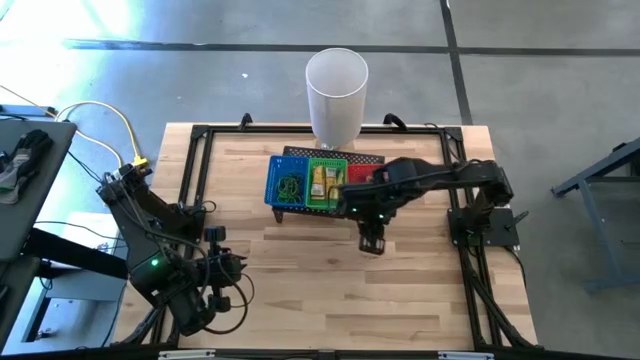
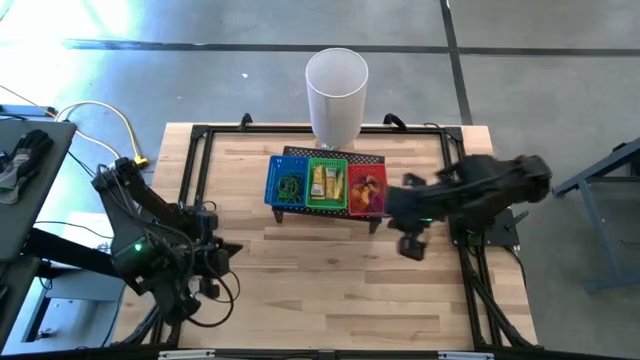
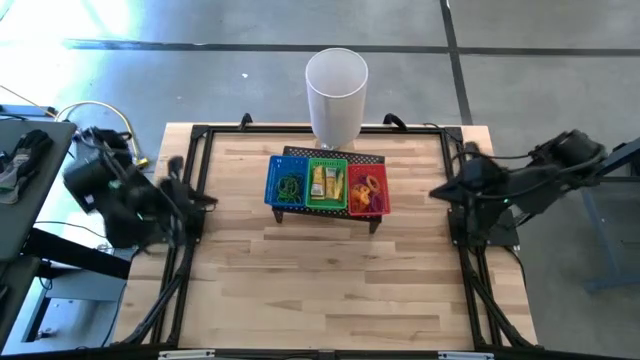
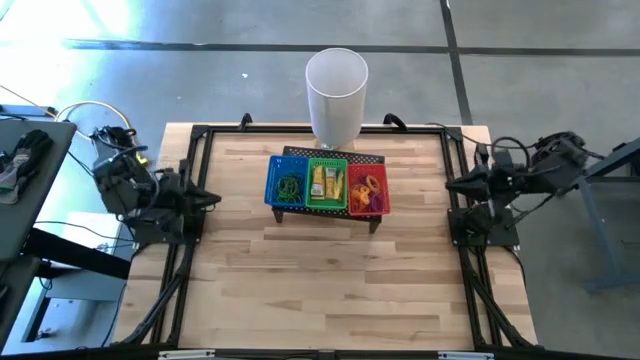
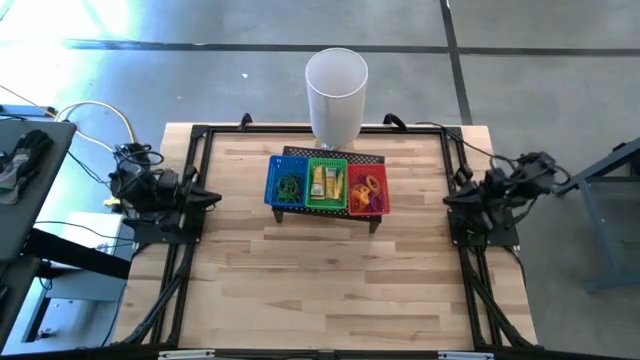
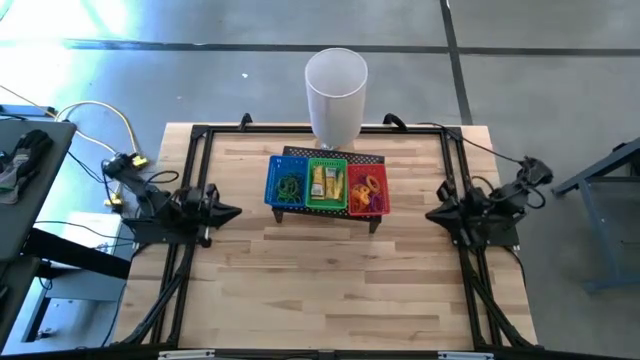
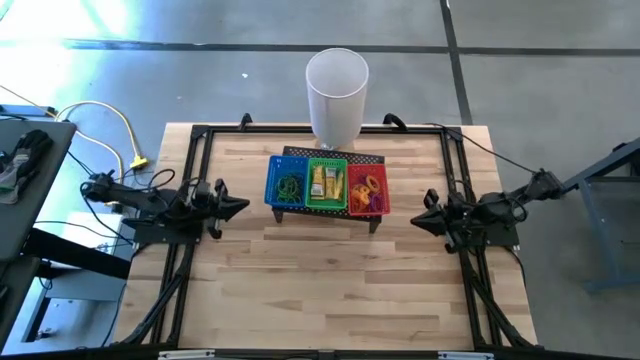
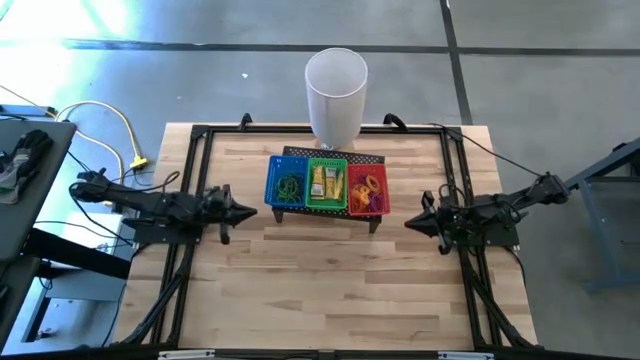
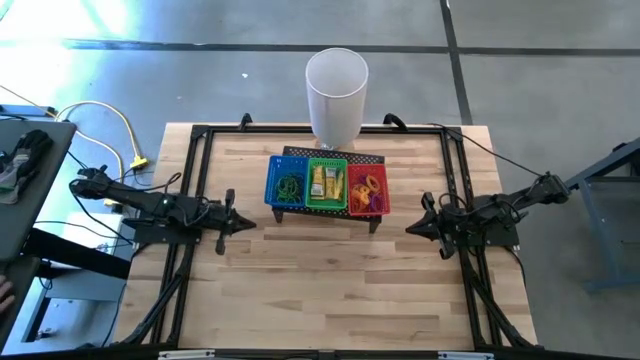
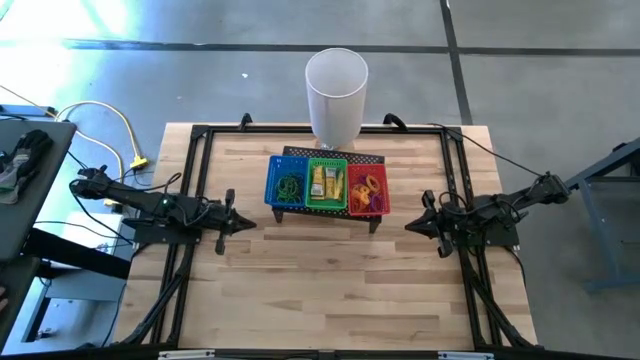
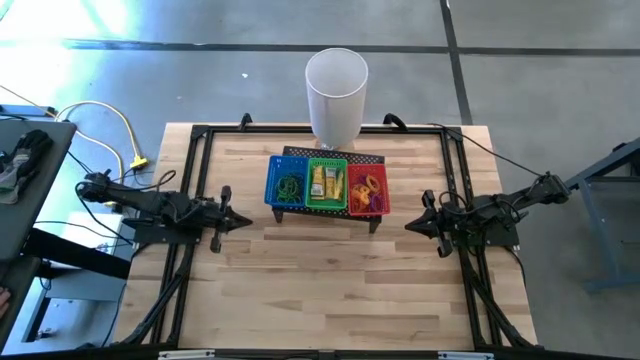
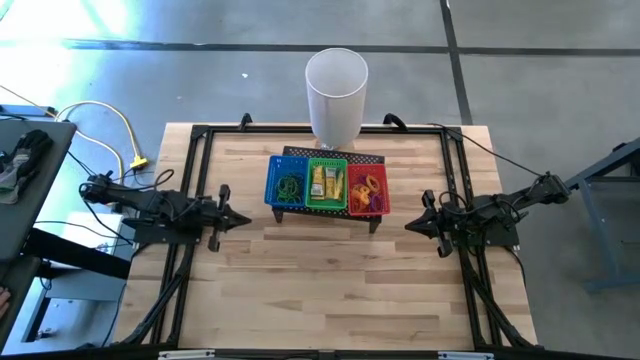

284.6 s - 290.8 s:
Task: Pick & Place Office Desk Supplies
Return to Home Position

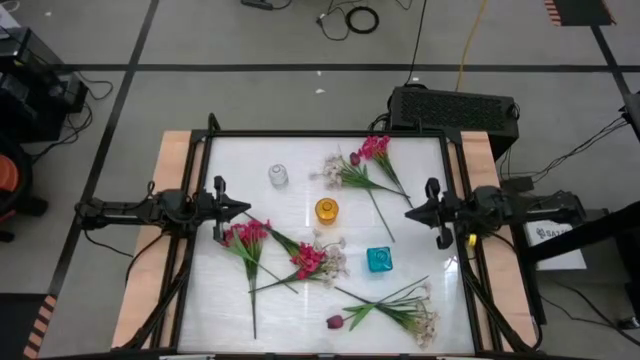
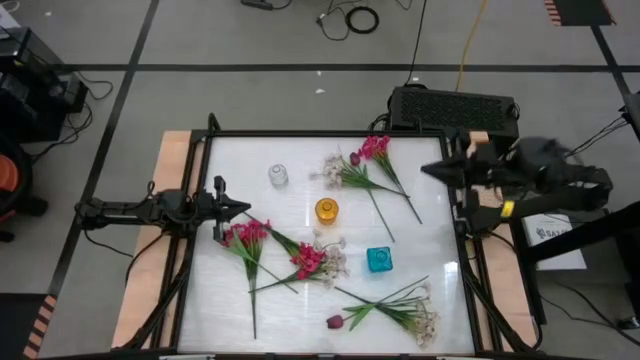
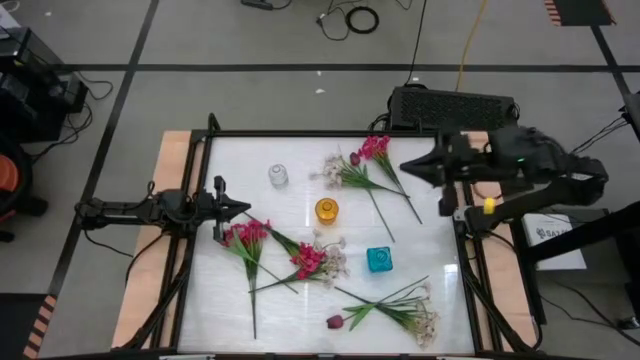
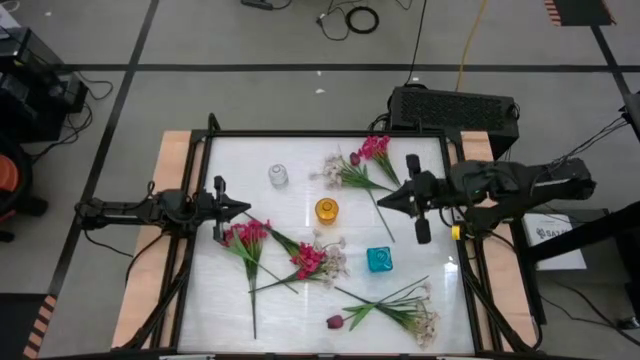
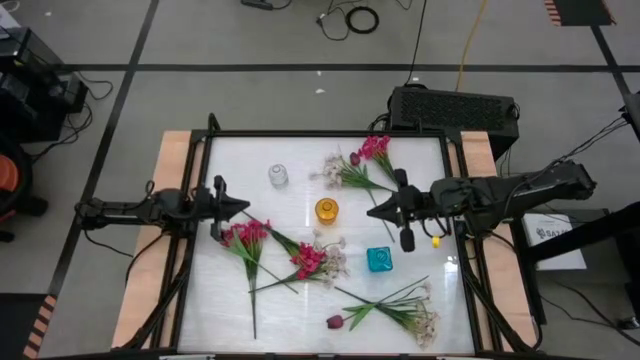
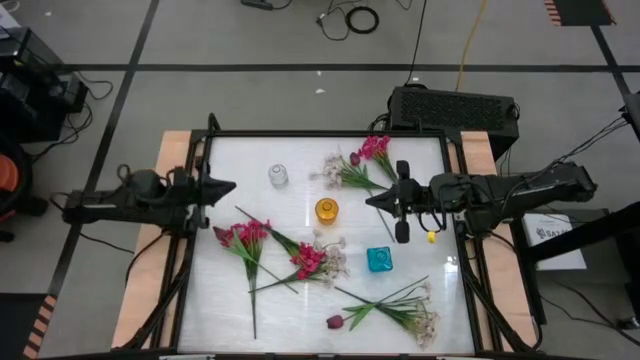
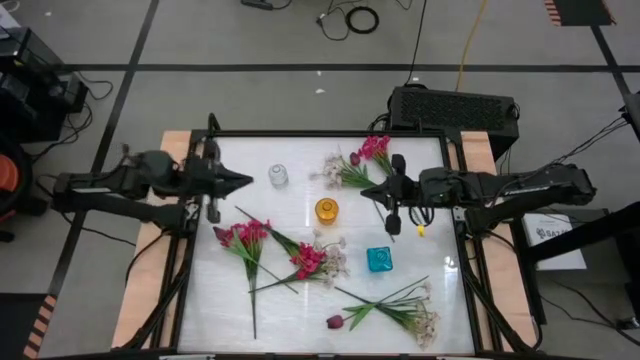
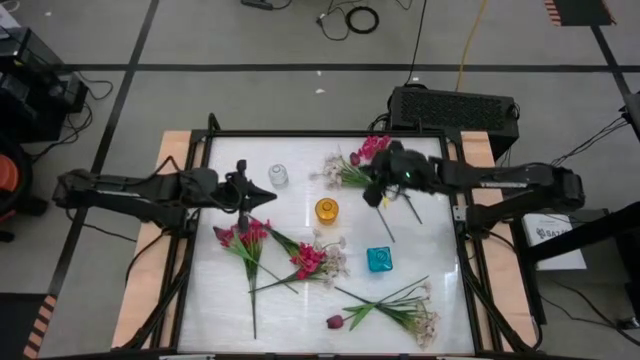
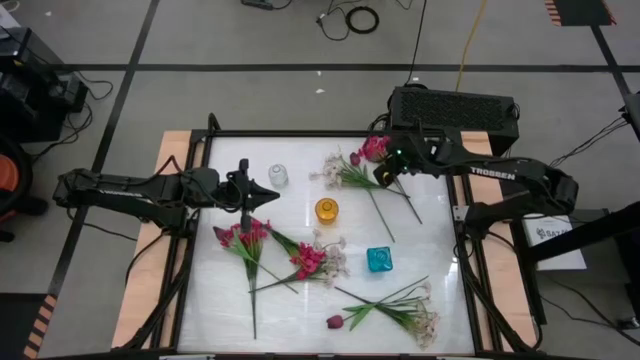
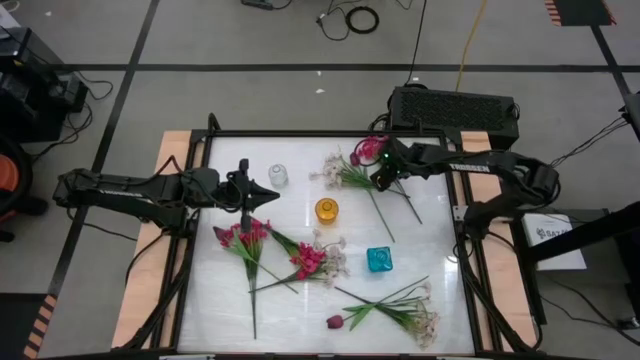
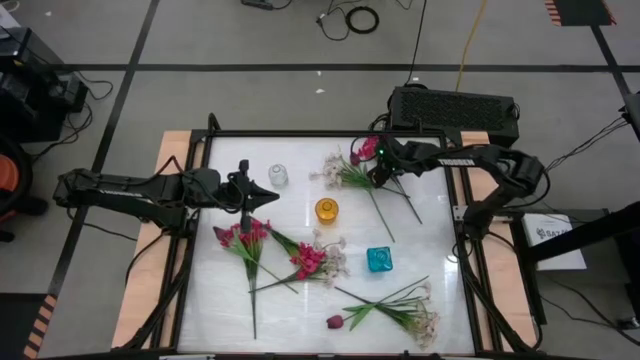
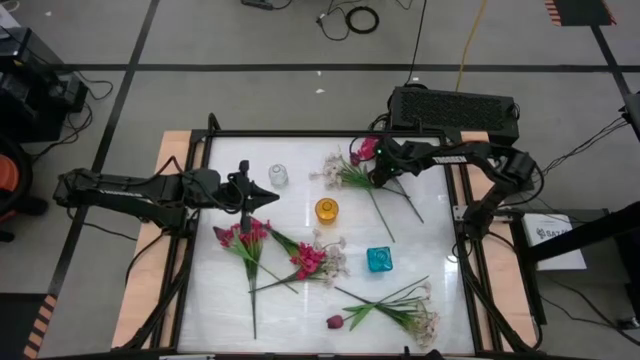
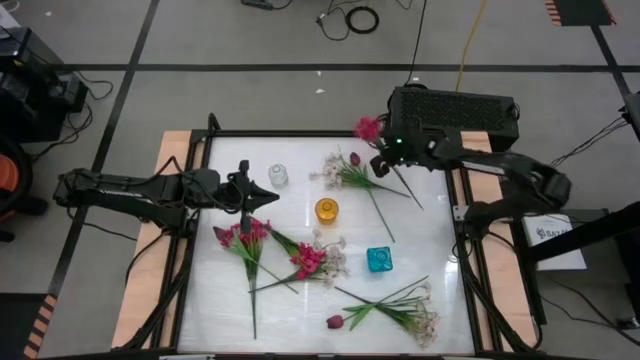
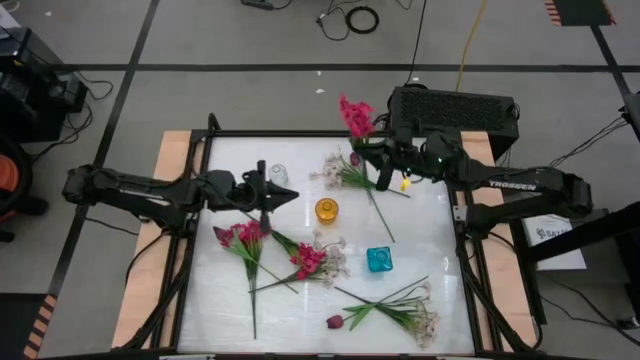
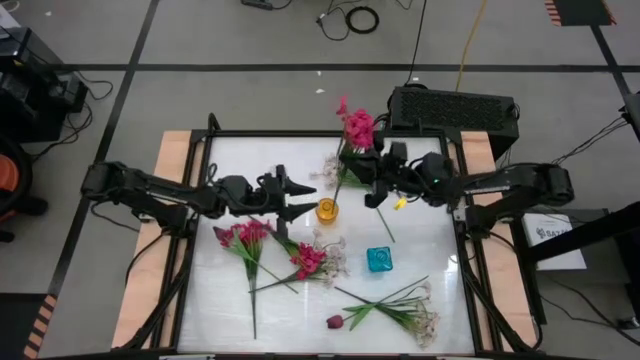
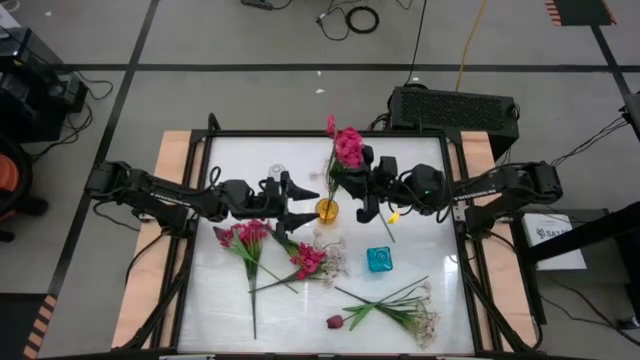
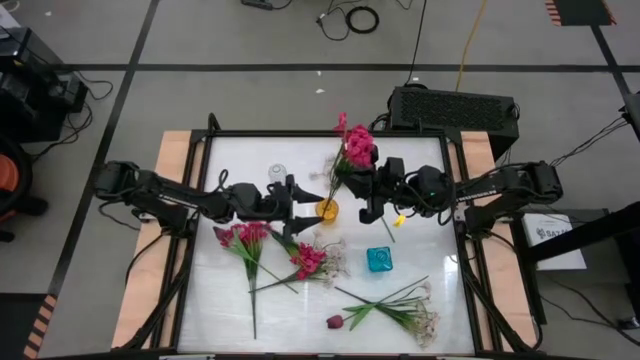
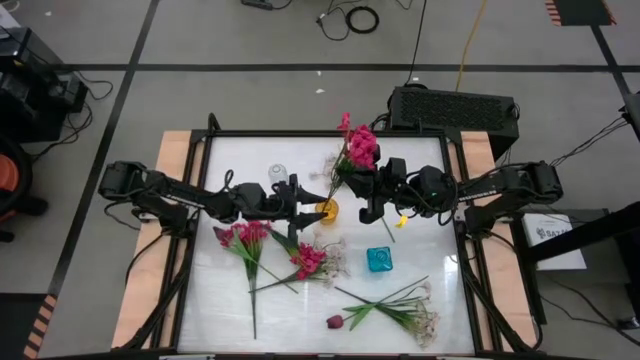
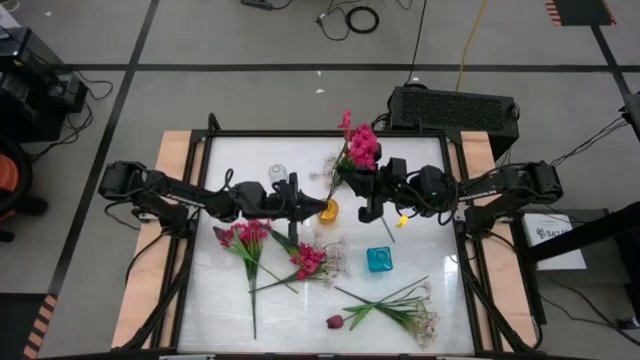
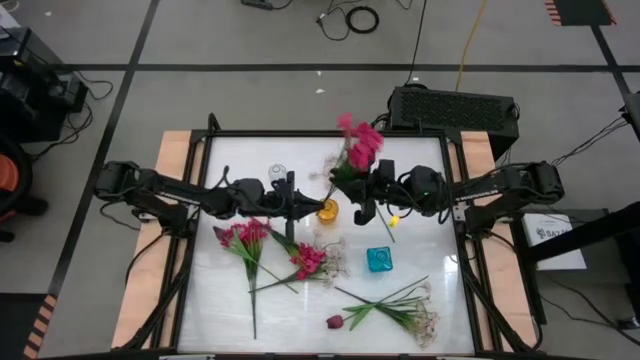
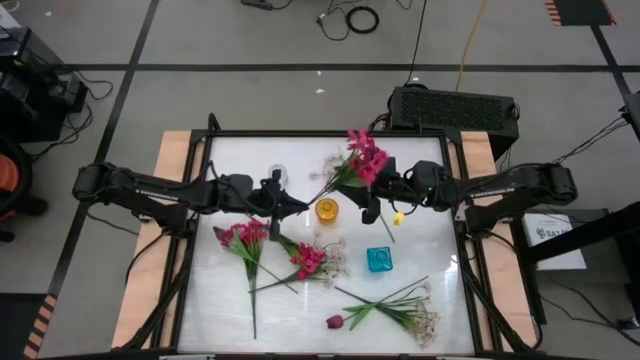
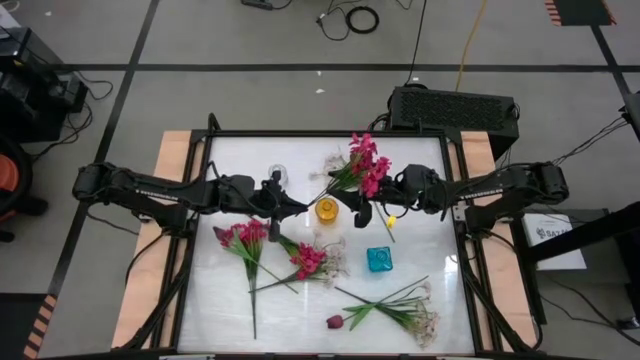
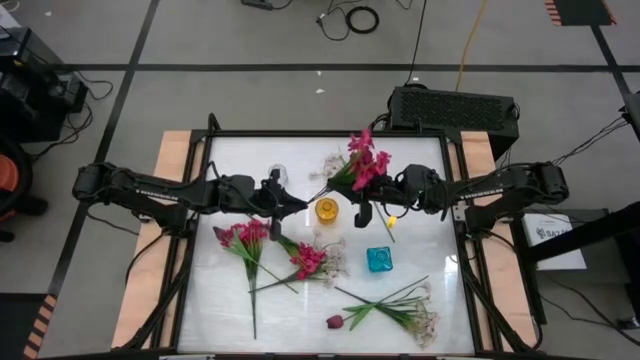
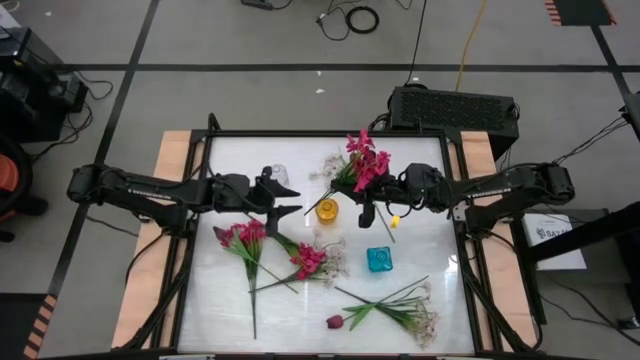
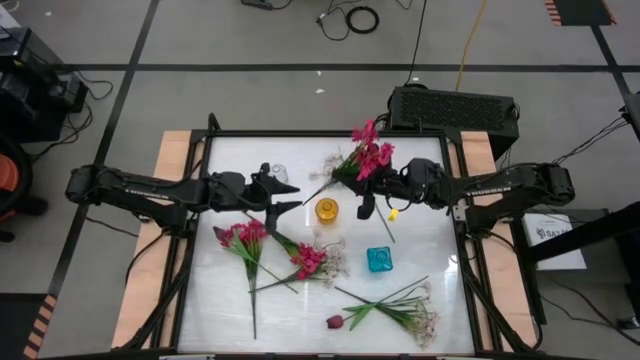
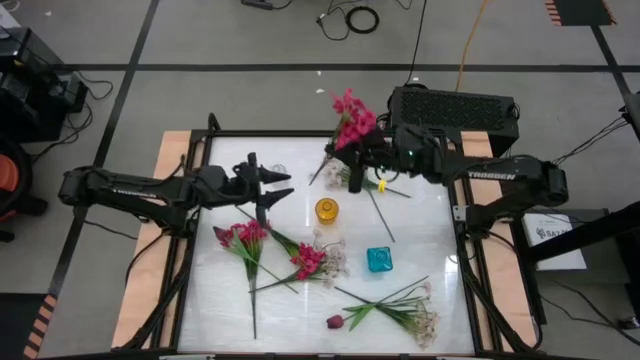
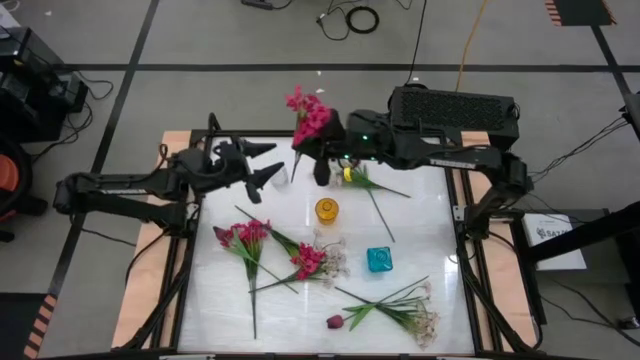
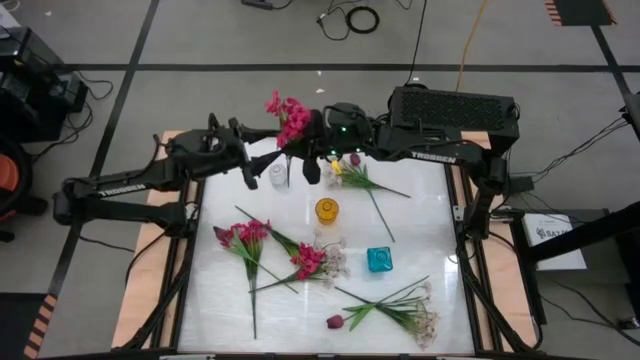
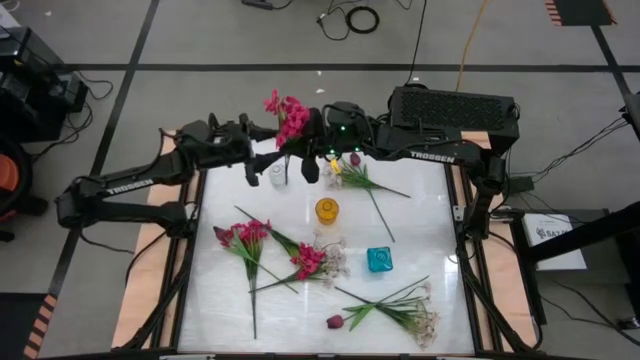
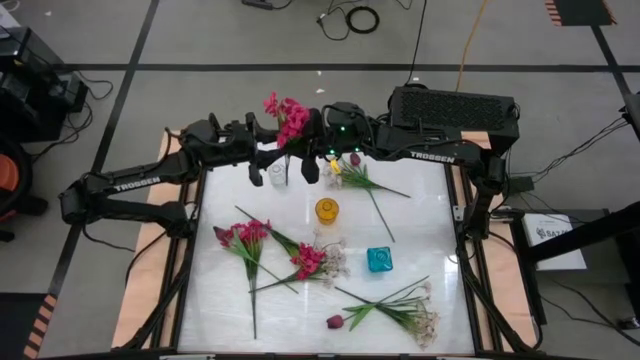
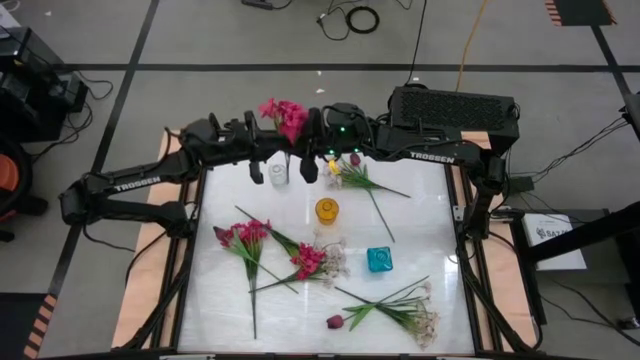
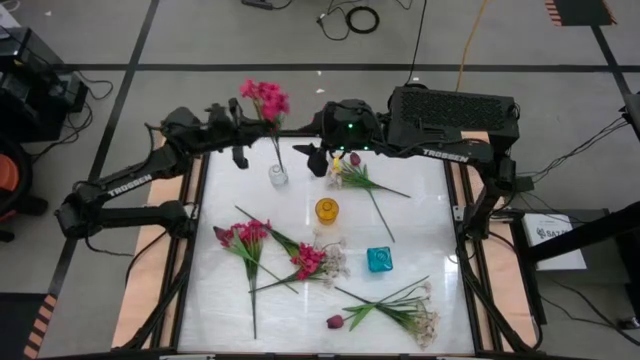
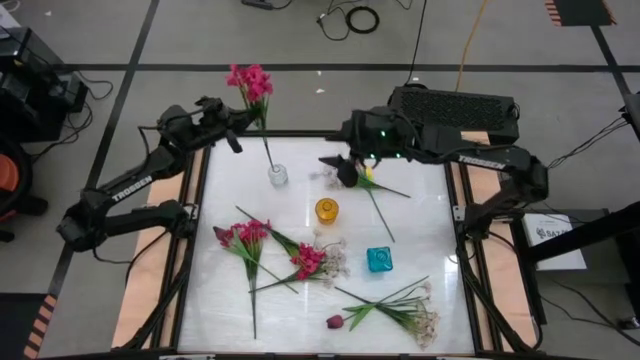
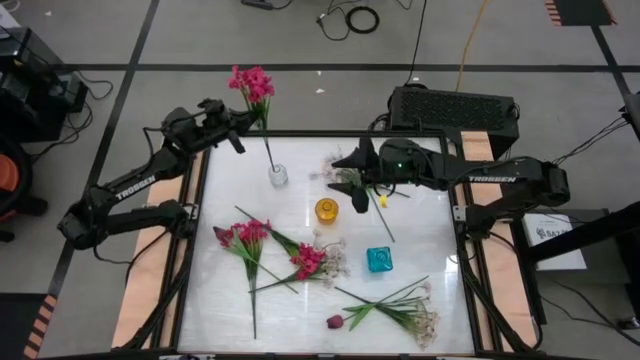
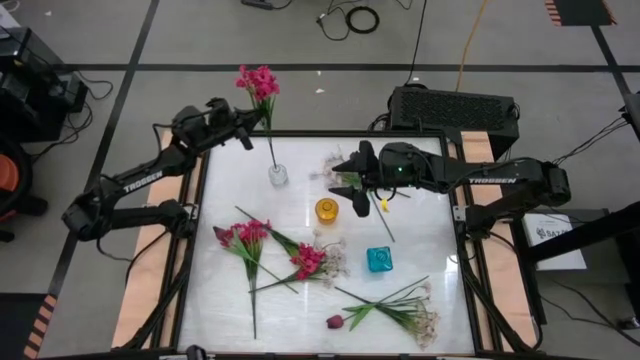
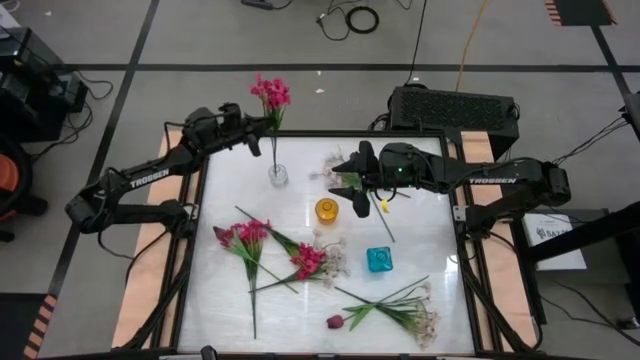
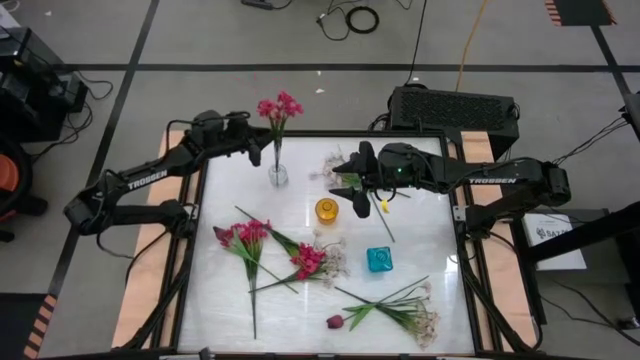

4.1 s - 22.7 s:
Task: Sort flowers into vase by color
Put the top pink flowers into the transparent vase
